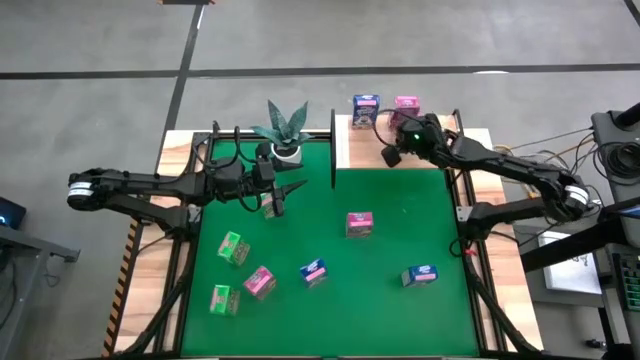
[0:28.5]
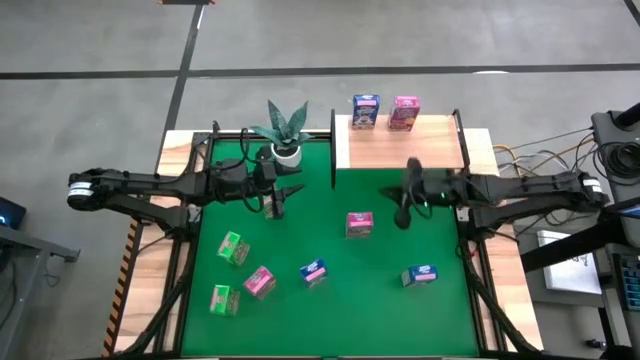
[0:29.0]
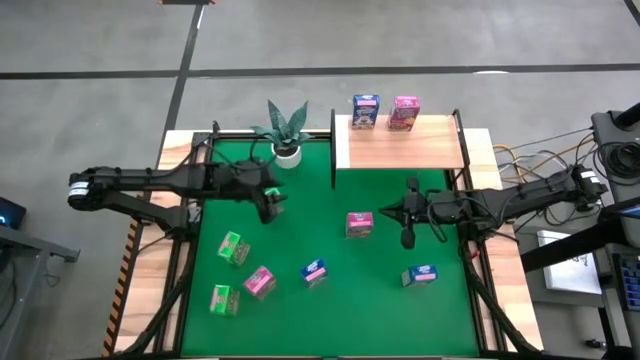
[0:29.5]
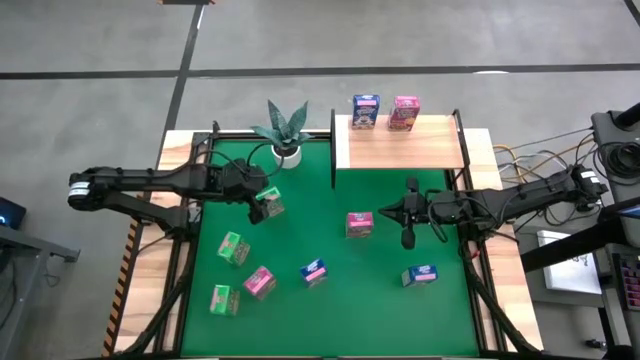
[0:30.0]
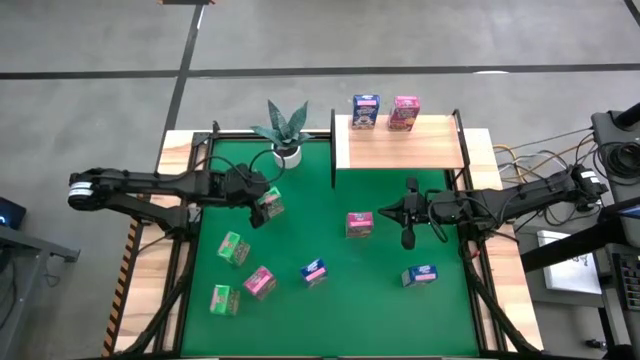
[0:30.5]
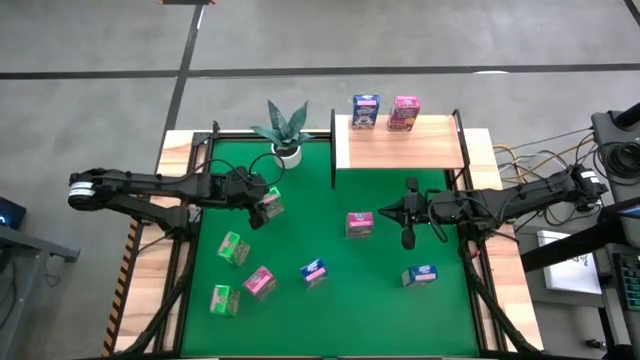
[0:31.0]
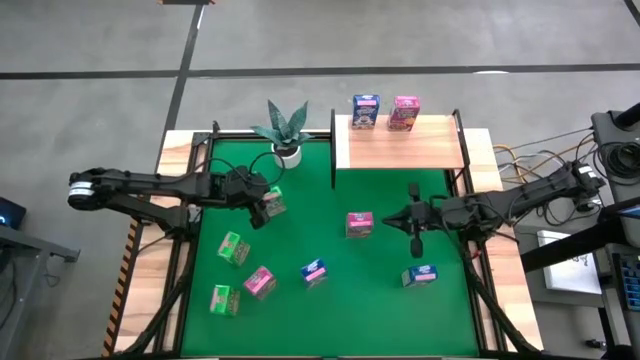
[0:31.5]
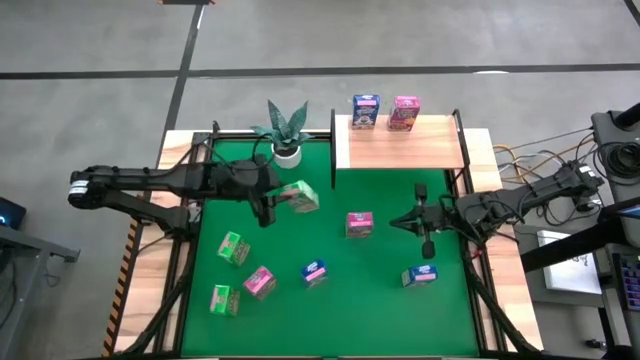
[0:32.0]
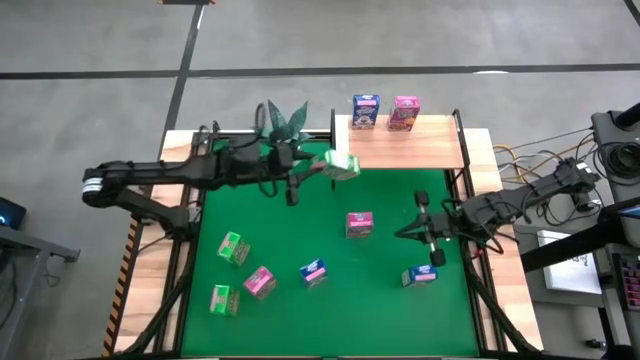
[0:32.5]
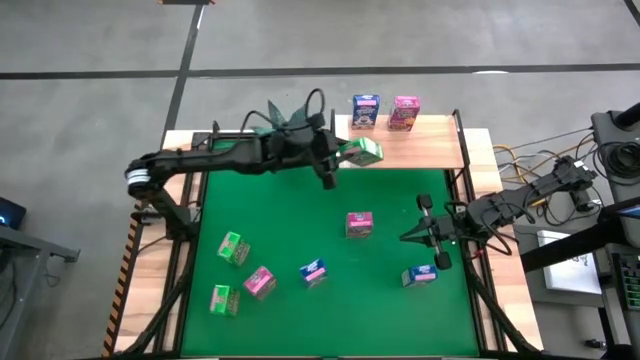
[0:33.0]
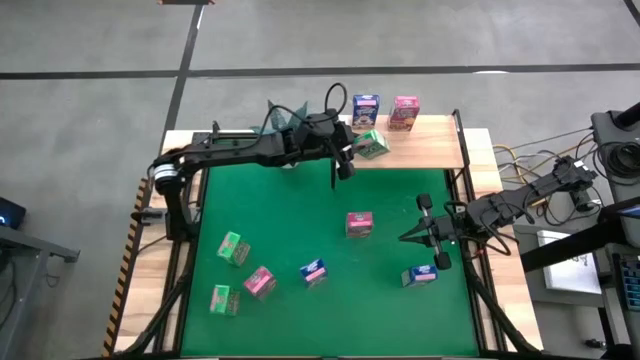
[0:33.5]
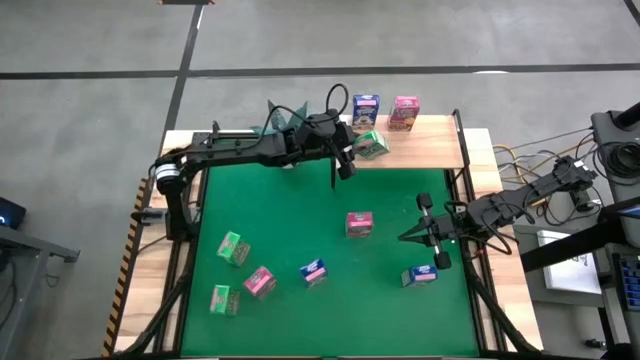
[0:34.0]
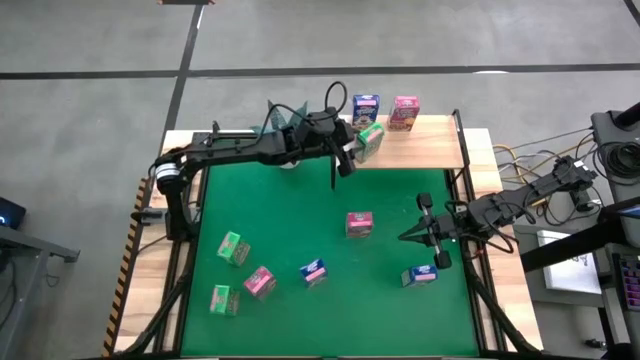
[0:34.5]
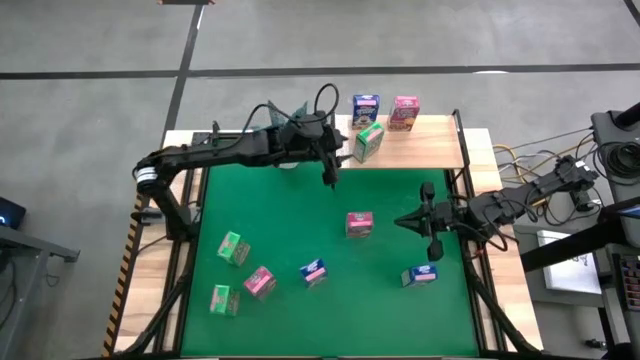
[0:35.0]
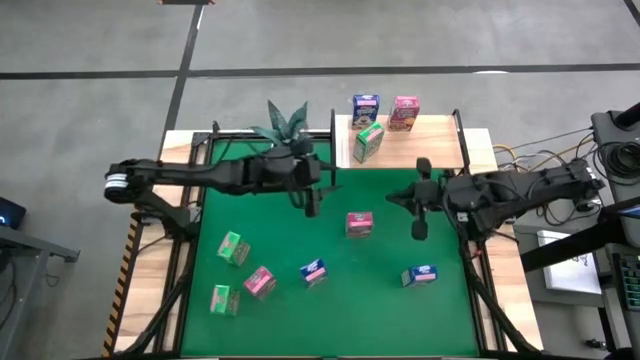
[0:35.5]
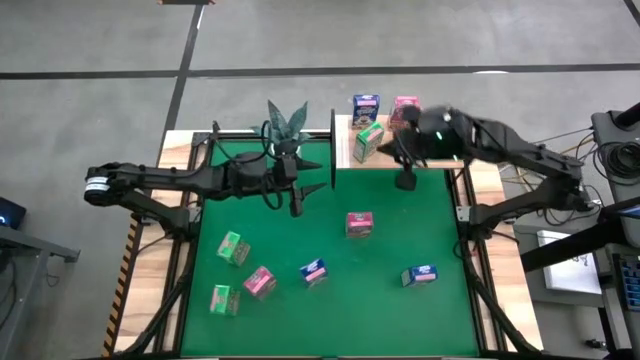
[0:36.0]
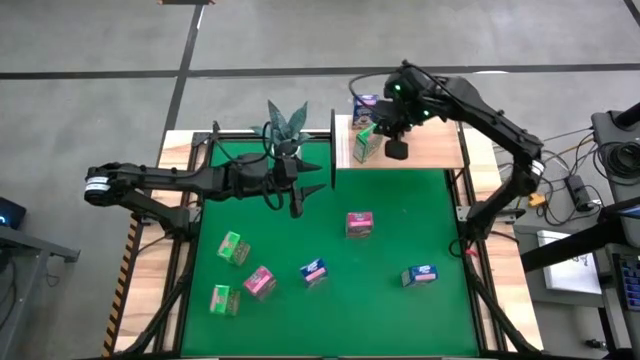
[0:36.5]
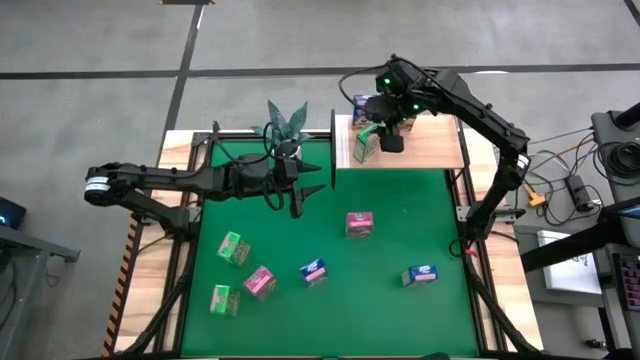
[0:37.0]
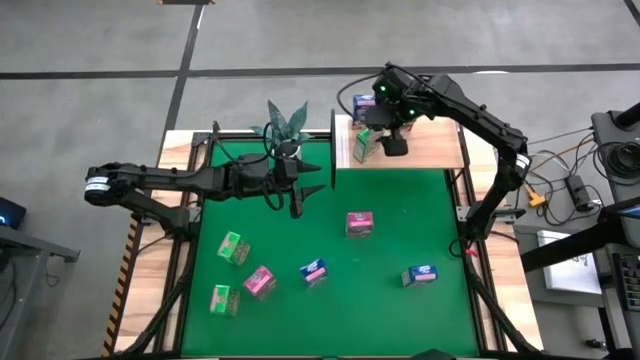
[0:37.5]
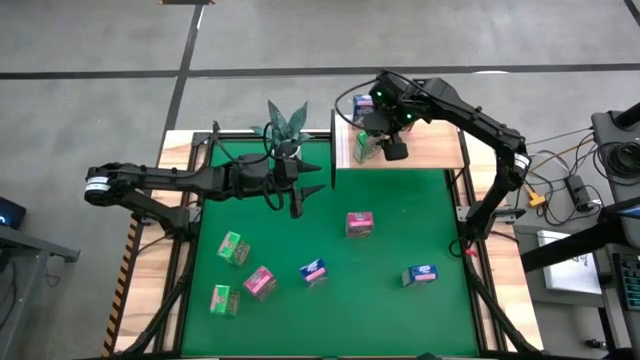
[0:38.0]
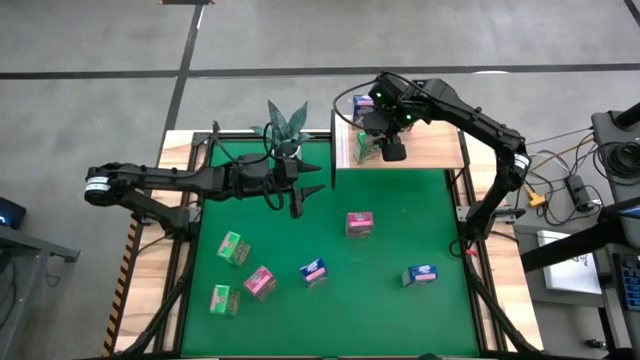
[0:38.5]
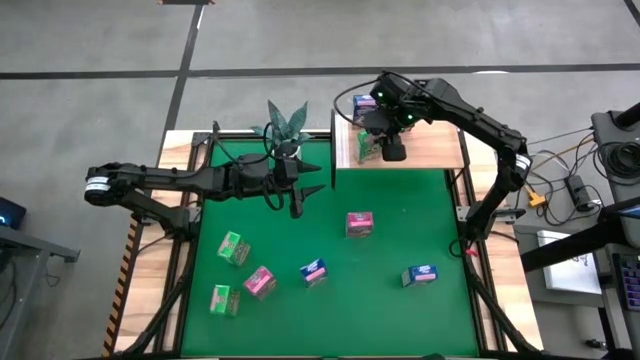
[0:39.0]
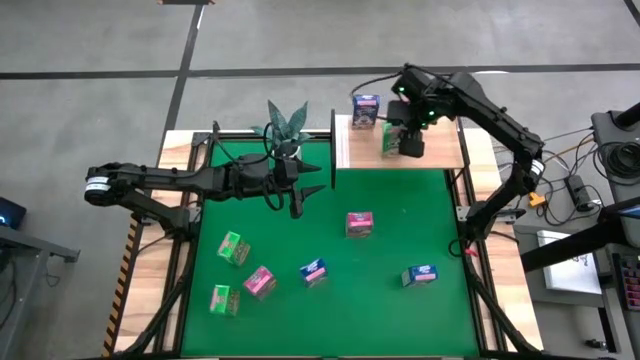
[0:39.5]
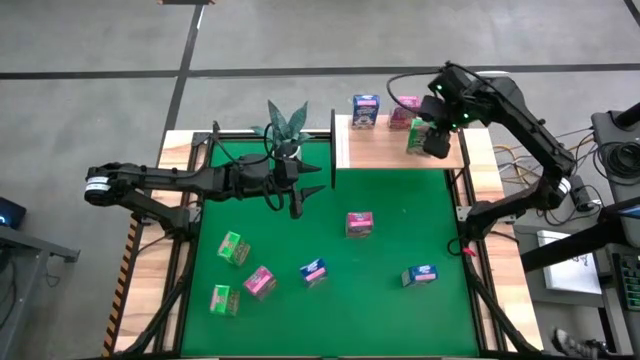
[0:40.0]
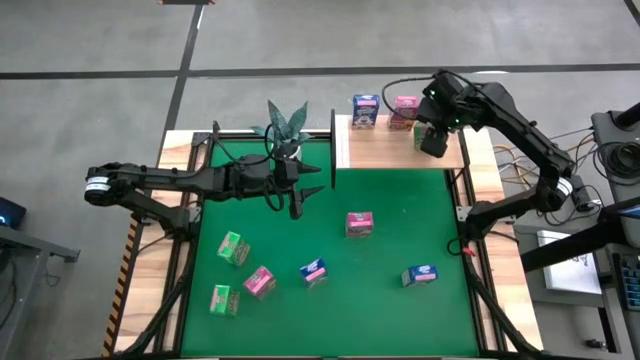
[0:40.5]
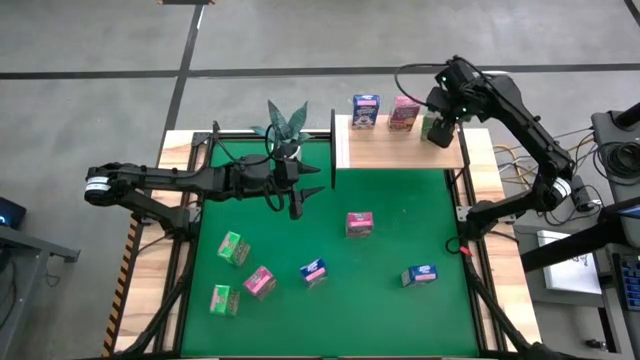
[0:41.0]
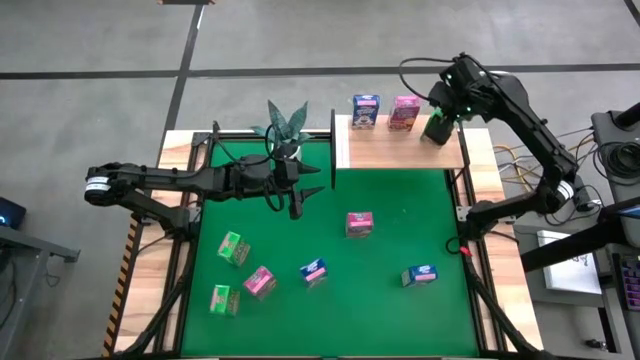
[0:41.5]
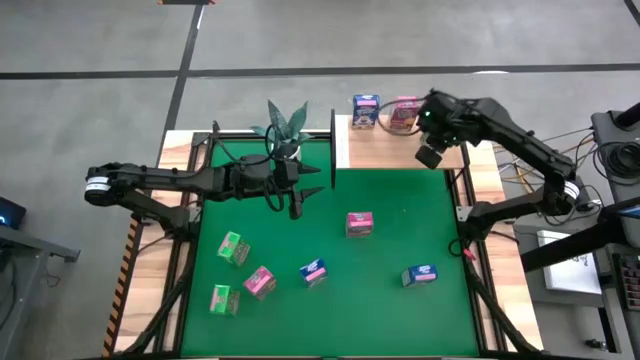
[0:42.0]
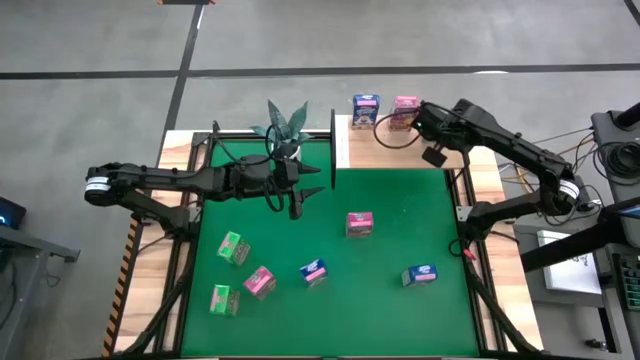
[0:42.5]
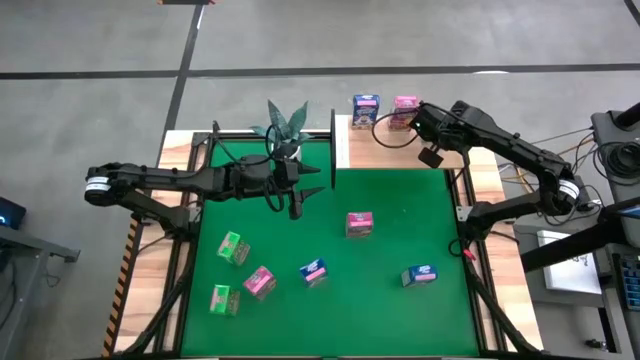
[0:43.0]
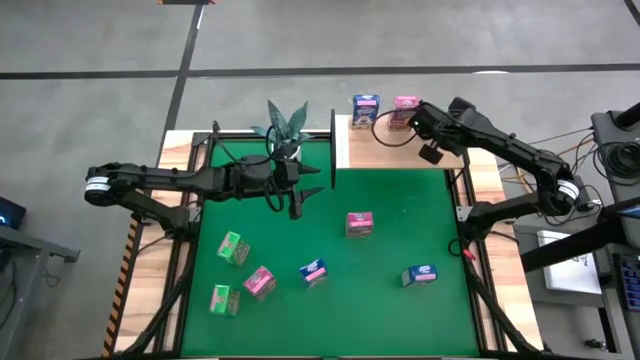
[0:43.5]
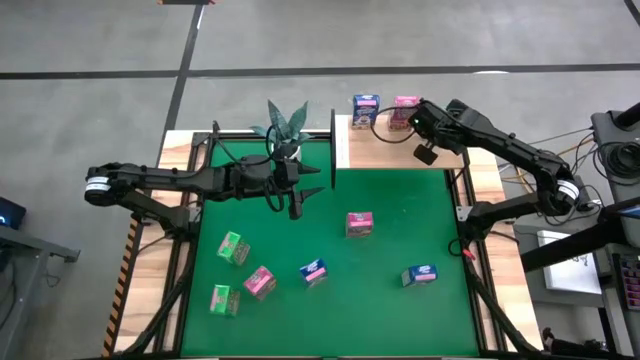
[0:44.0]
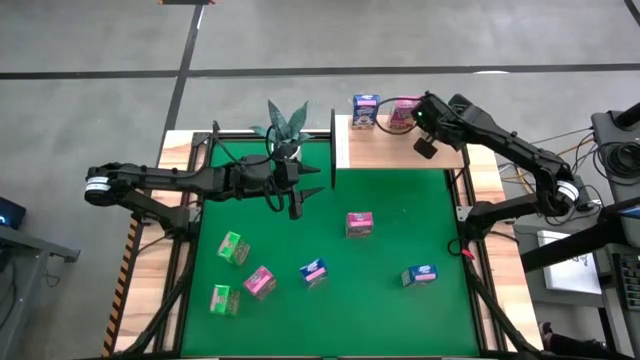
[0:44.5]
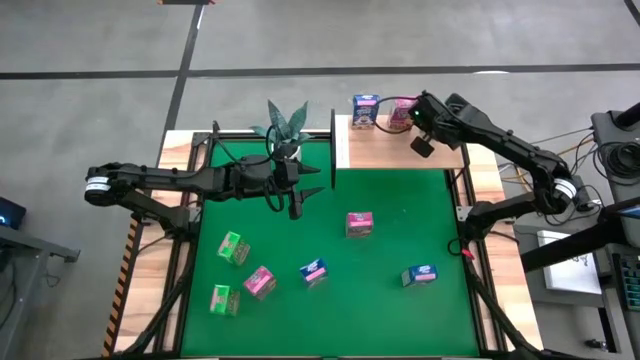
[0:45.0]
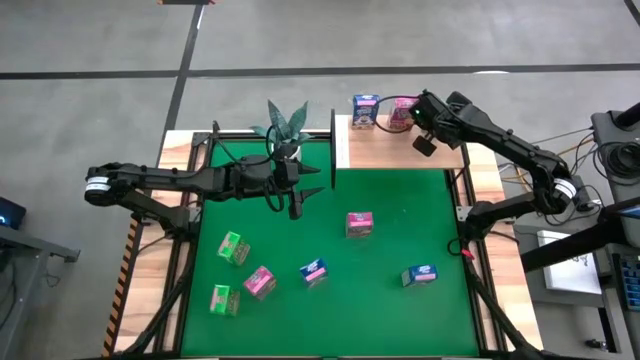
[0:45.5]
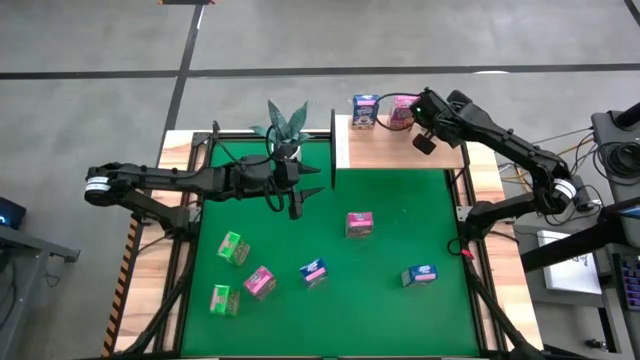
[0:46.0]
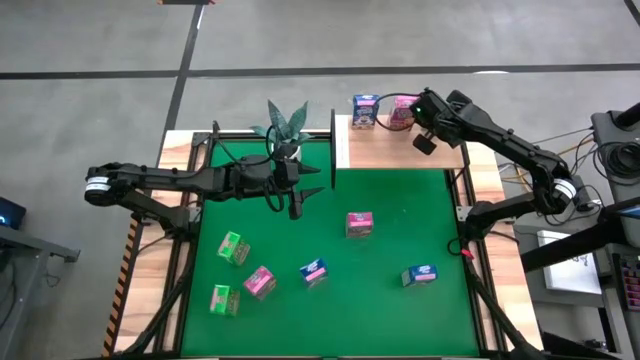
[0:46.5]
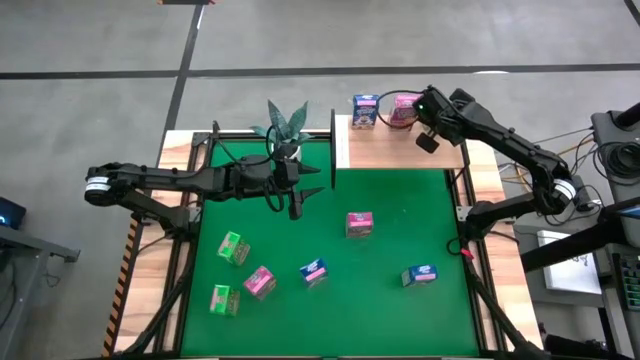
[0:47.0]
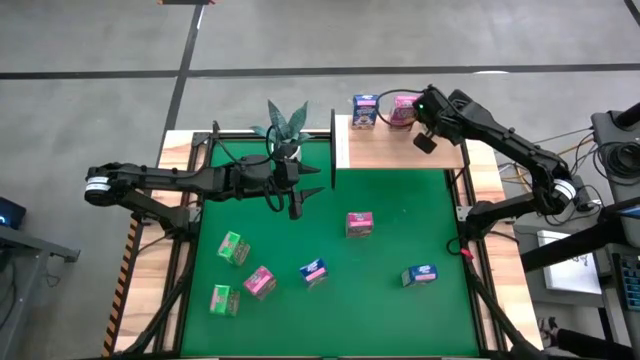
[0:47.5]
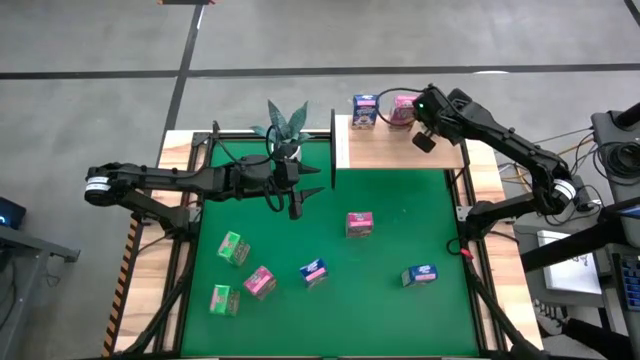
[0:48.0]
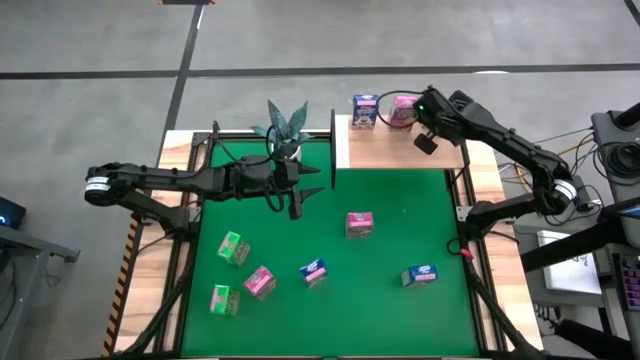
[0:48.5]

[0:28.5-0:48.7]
Task: Stack cereal on shelf
Put the top green cereal box on the shelf

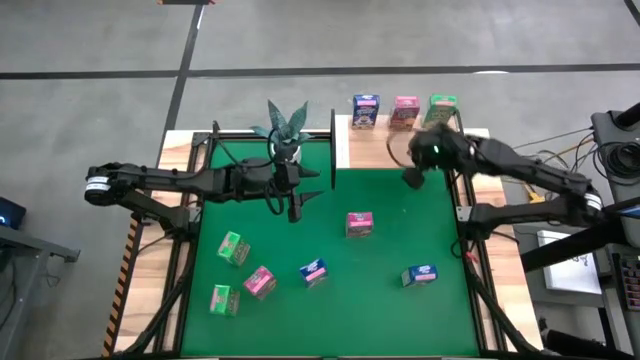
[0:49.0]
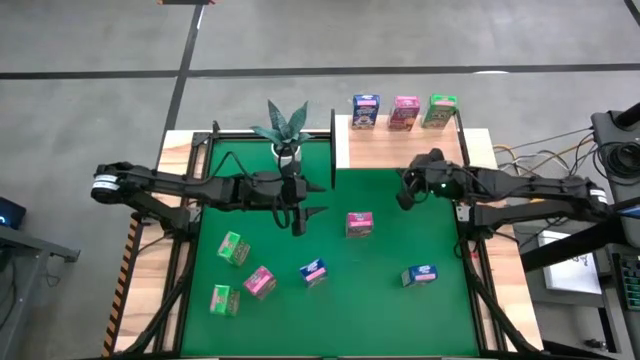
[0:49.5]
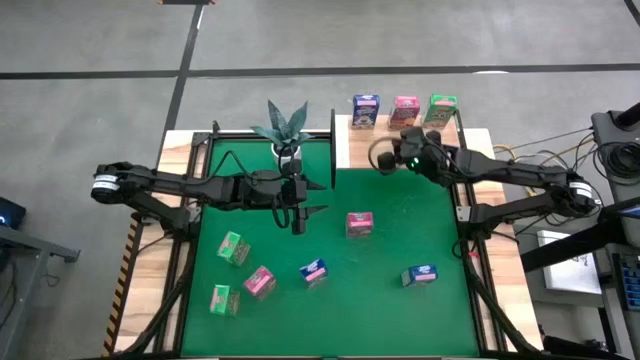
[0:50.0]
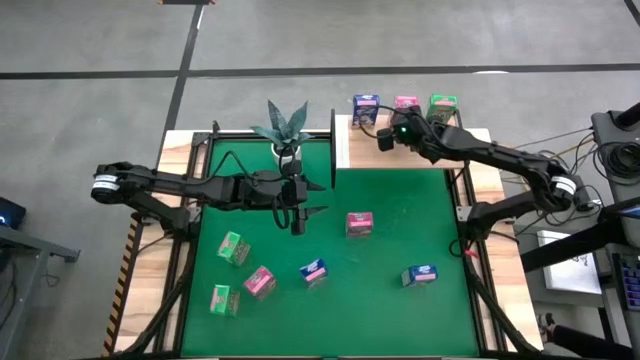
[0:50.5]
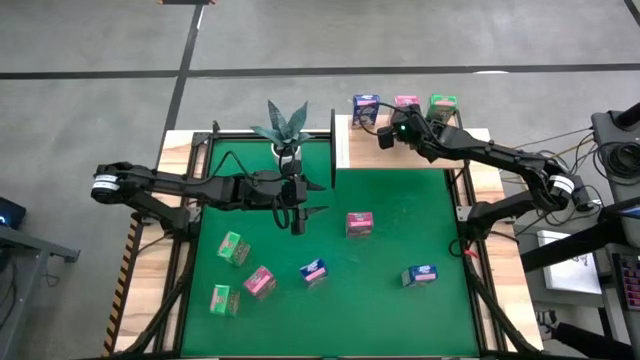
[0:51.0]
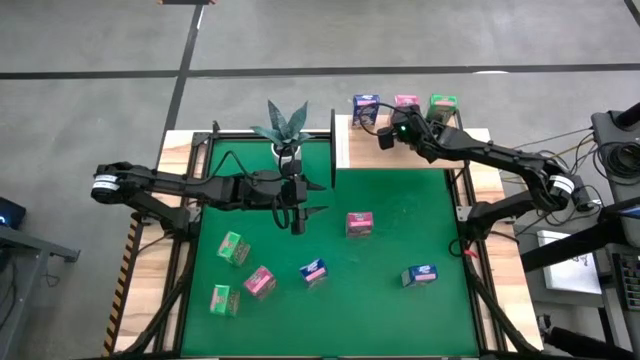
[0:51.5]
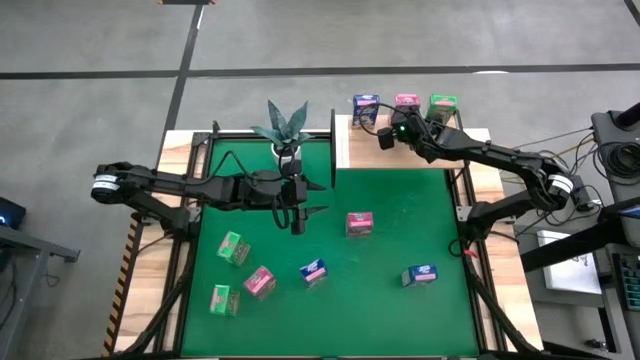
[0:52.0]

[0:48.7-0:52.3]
Adjust the pink cereal box on the shelf
